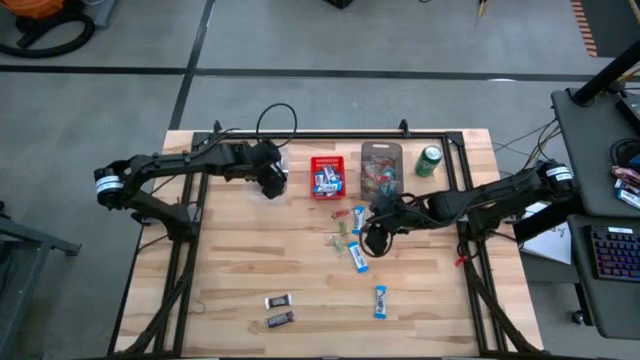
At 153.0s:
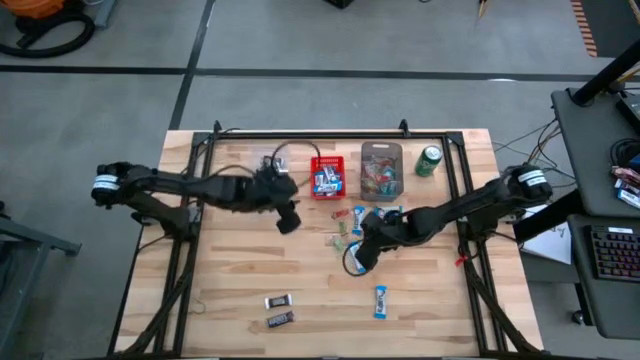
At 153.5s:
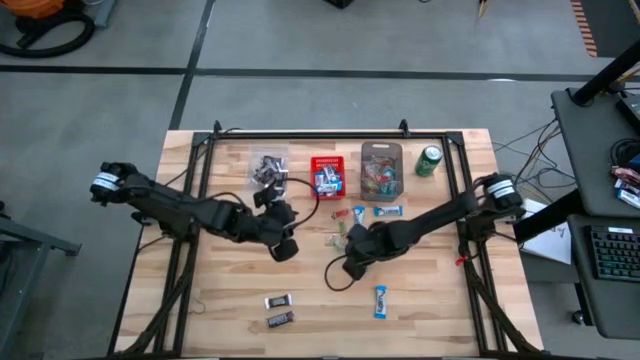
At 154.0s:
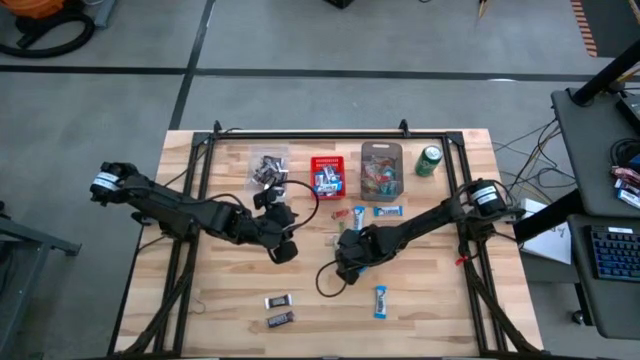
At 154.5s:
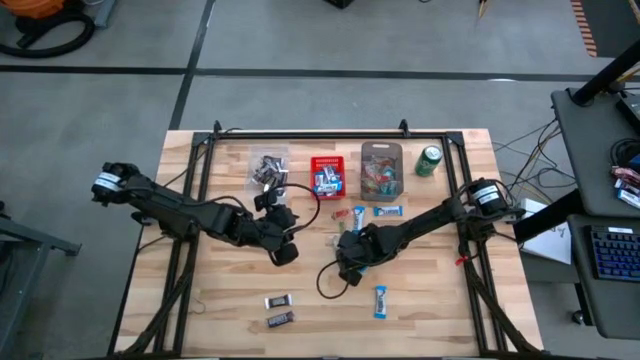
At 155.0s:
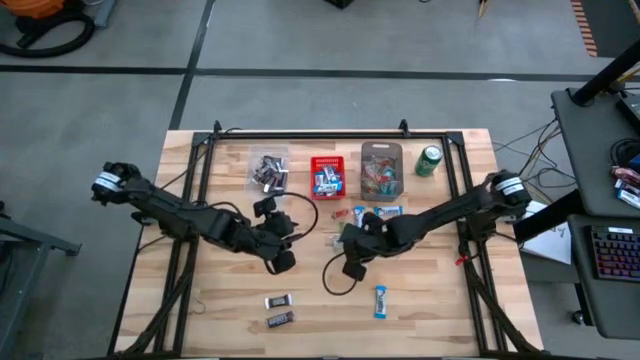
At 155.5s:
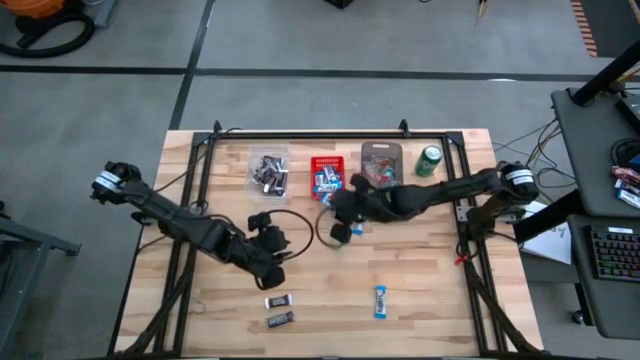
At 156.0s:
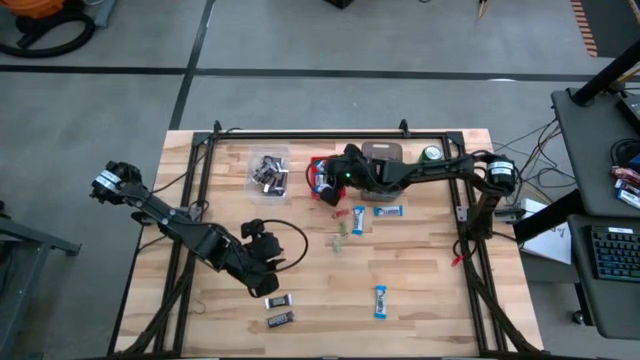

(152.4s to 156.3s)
Task: Sort candy
Put the white chocolate bar into the red bin

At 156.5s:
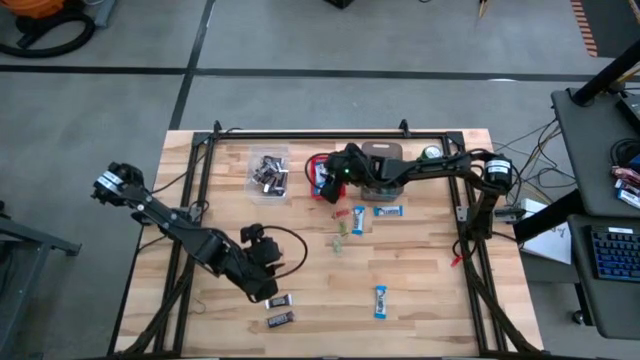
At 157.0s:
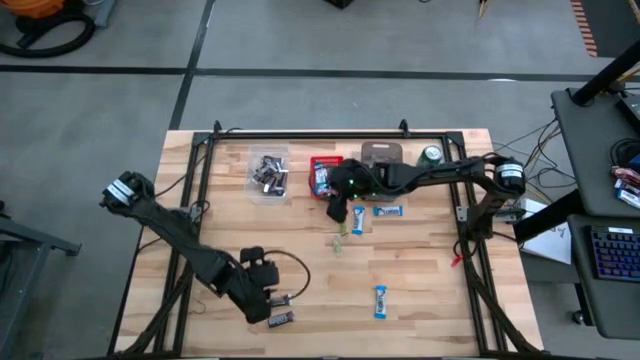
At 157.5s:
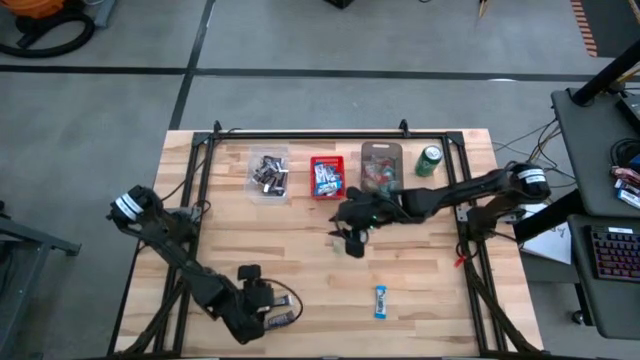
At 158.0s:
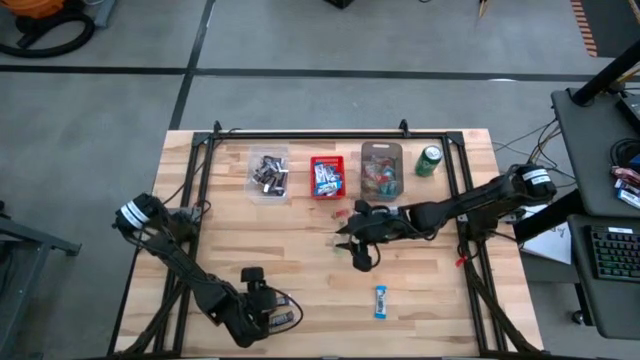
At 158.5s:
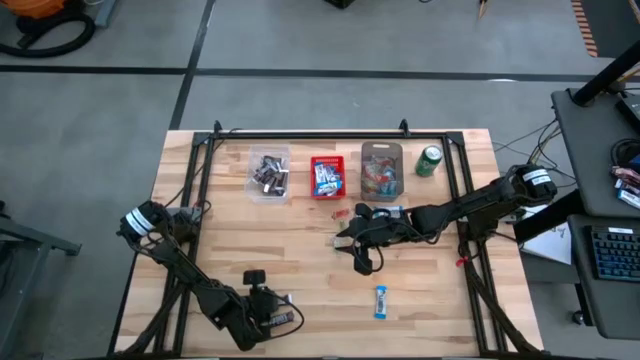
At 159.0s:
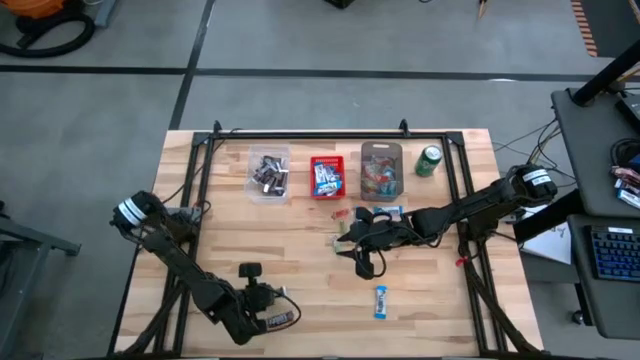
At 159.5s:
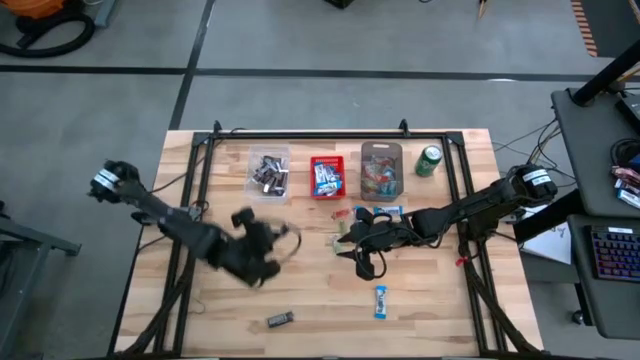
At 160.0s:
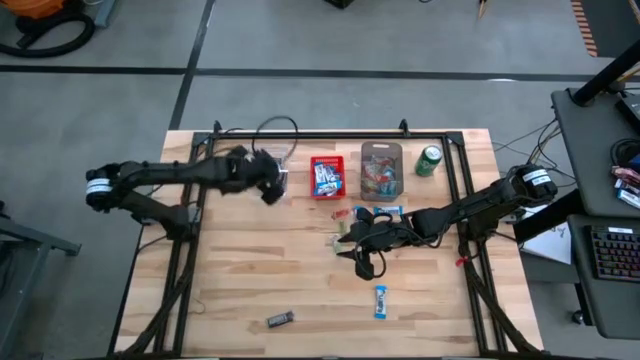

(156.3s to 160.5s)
Put the brown chocolate bar into the transparent bin

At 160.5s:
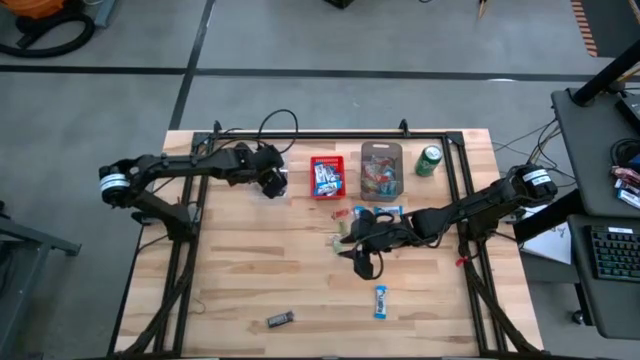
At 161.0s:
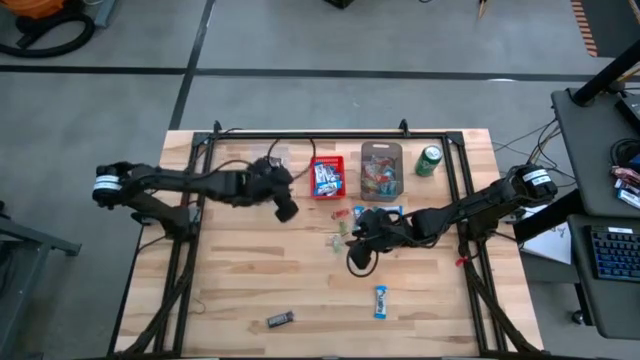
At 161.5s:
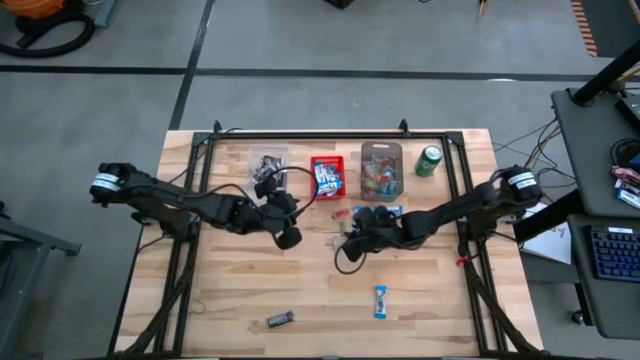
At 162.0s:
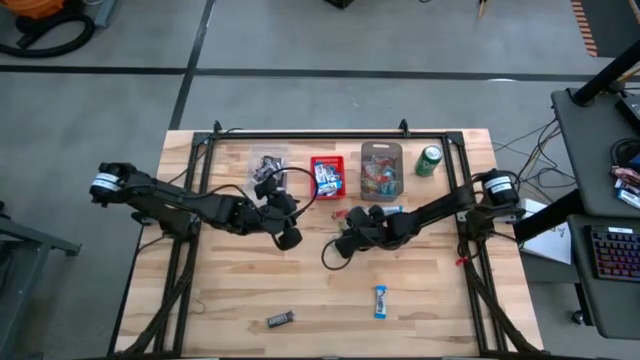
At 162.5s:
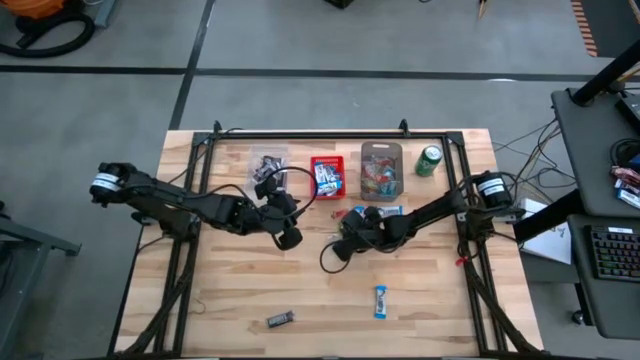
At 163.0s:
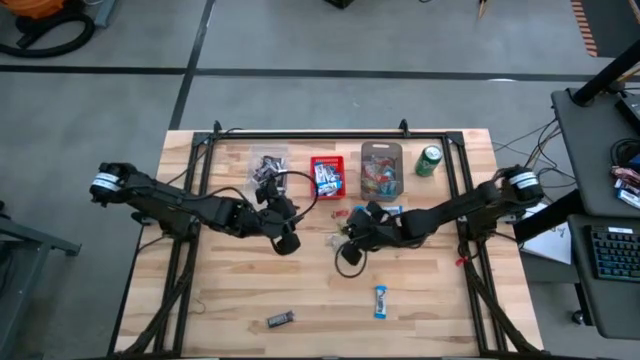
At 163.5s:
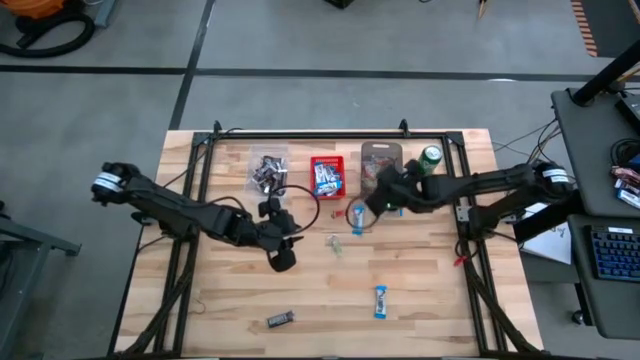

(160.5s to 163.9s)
Put the green gummy candy into the black bin

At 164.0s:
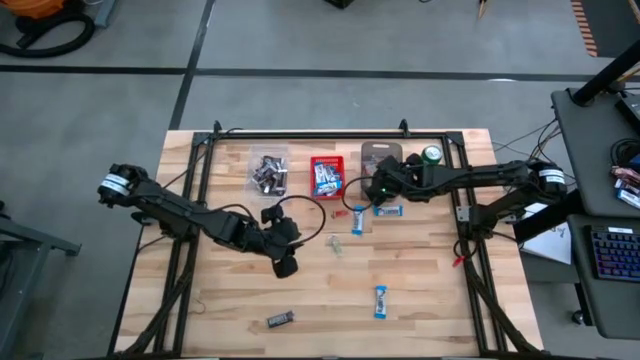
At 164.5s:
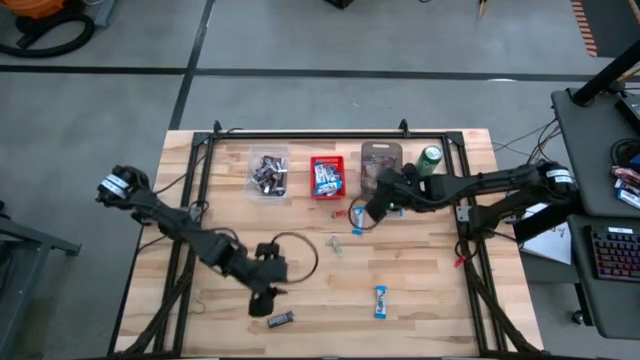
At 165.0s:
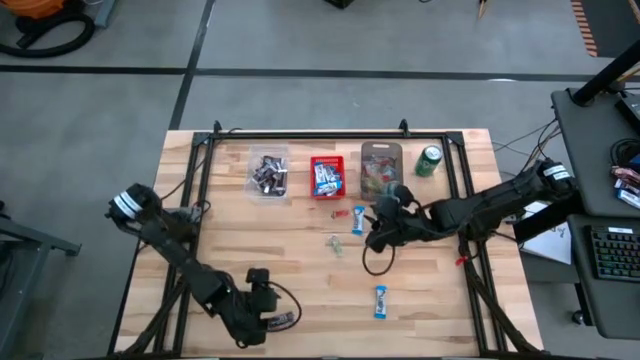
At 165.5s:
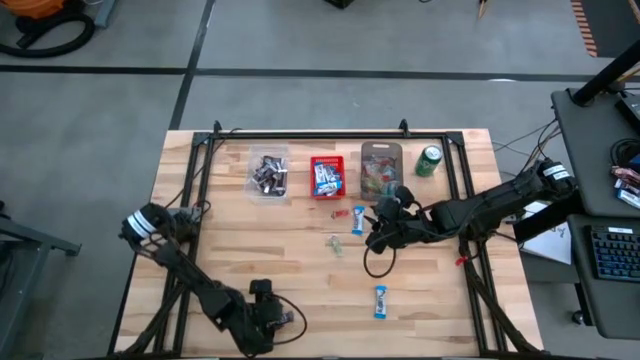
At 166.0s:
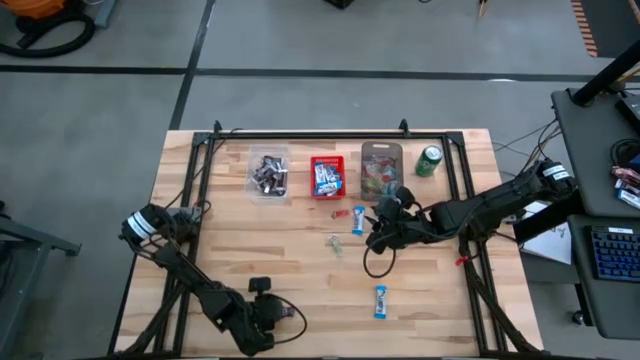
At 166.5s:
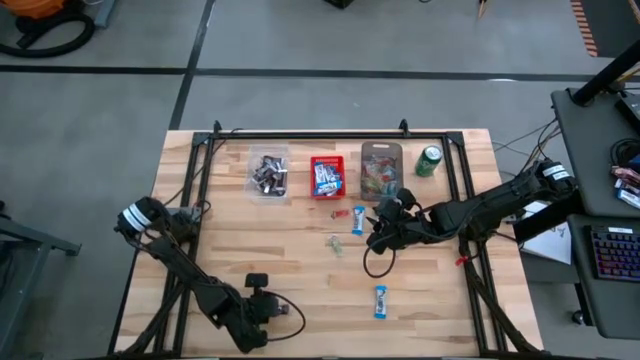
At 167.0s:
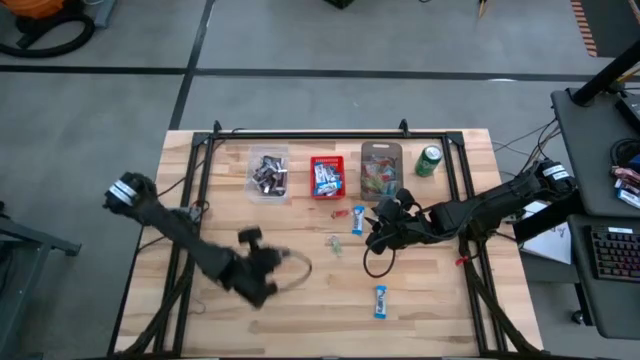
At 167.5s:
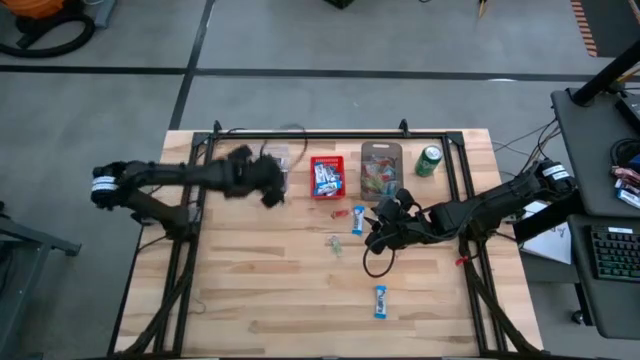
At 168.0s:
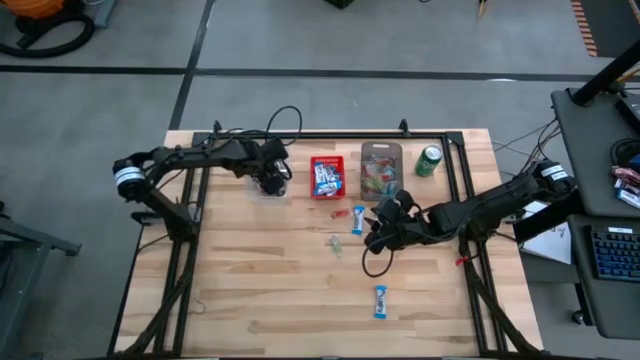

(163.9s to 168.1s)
Put the brown chocolate bar into the transparent bin

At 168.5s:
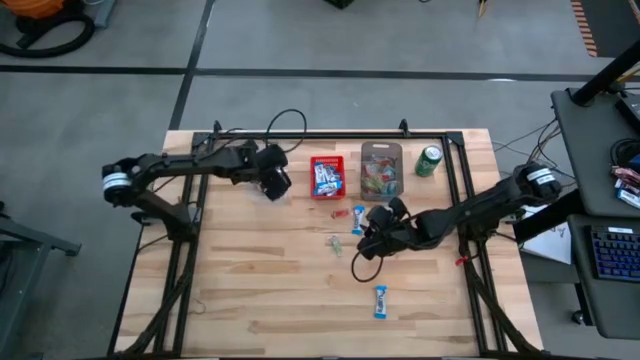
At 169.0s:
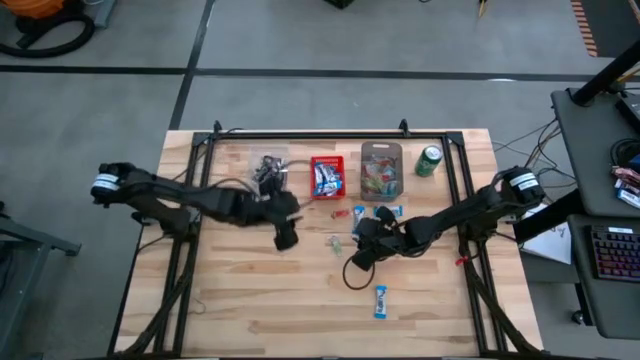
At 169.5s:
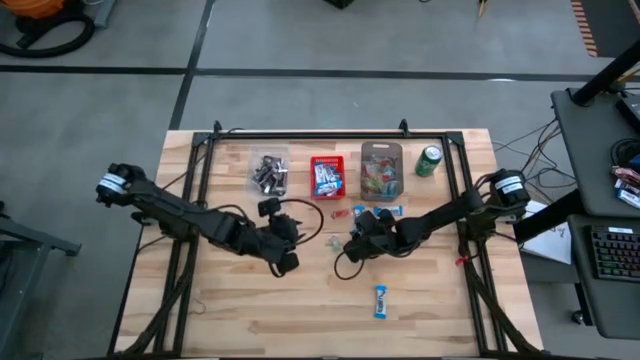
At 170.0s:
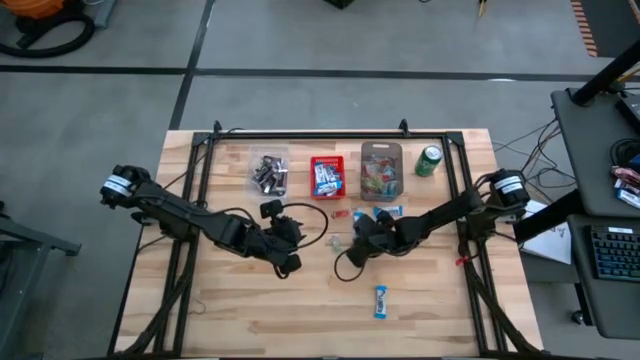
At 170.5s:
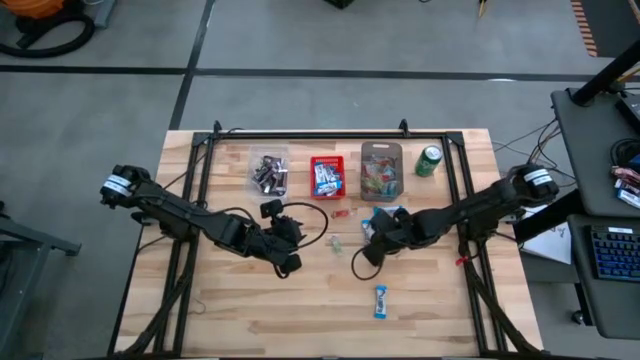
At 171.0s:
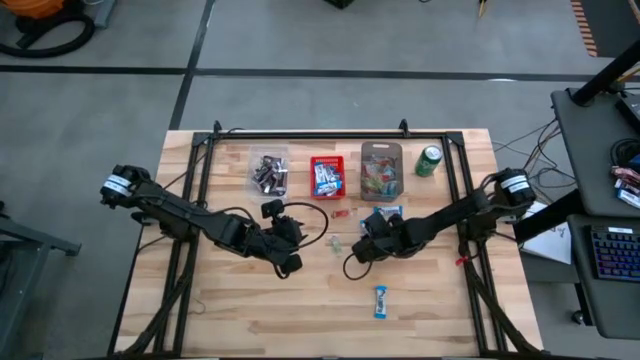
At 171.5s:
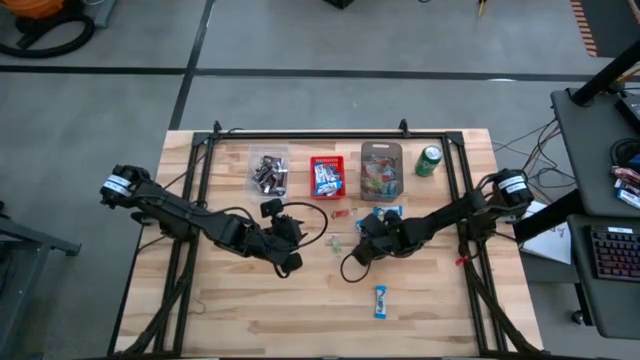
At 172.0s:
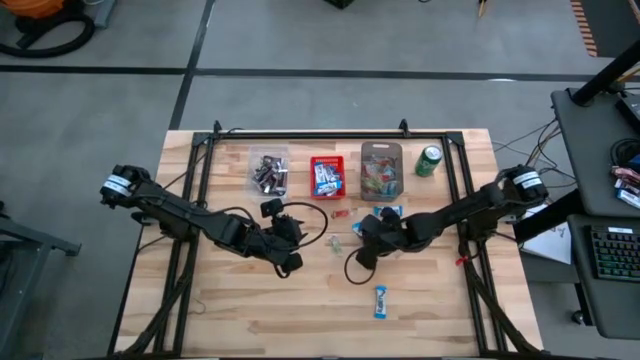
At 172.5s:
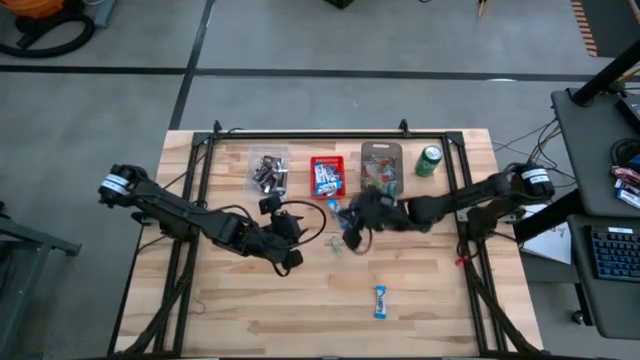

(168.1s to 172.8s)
Put the white chocolate bar into the red bin
